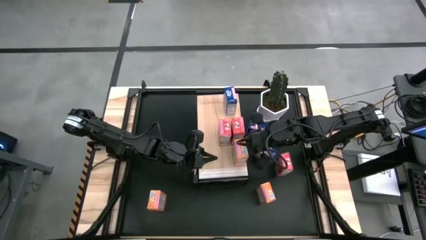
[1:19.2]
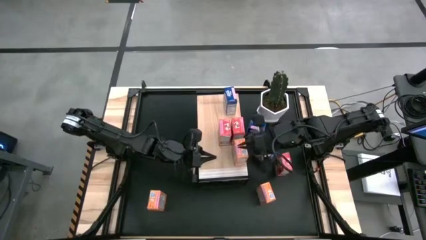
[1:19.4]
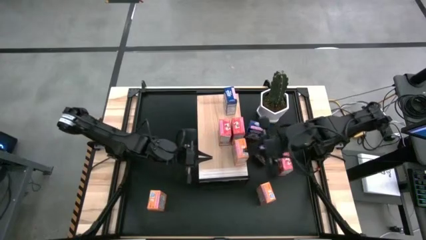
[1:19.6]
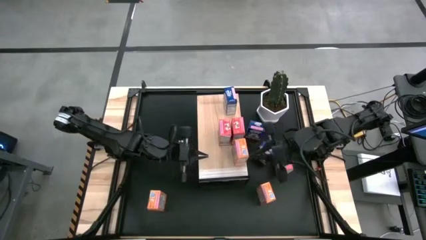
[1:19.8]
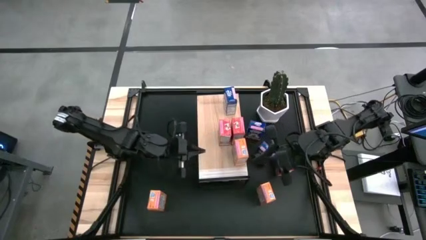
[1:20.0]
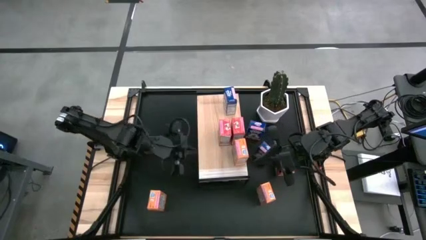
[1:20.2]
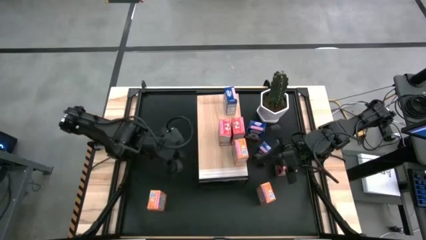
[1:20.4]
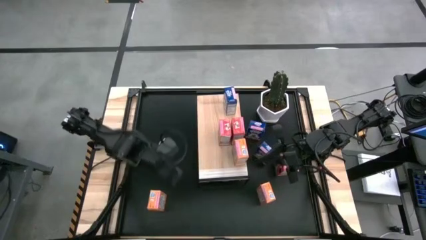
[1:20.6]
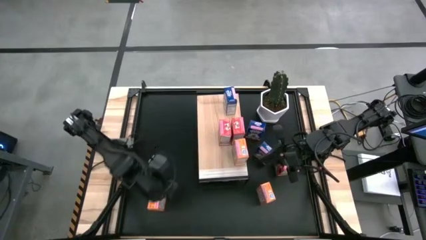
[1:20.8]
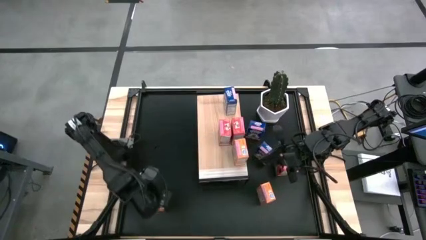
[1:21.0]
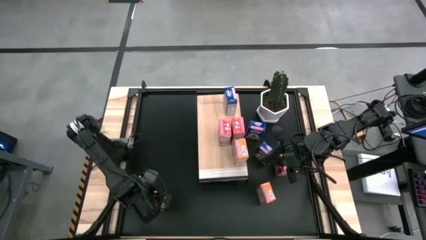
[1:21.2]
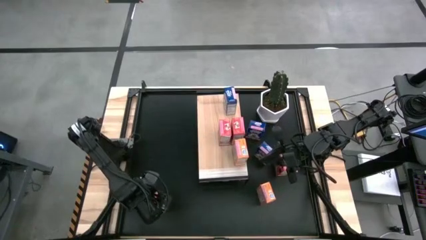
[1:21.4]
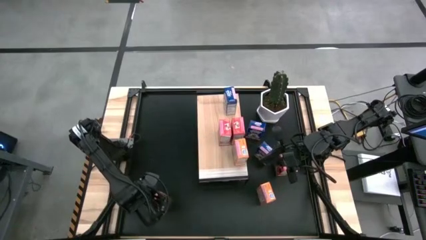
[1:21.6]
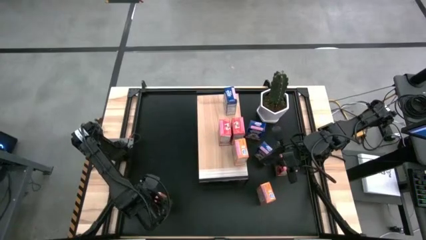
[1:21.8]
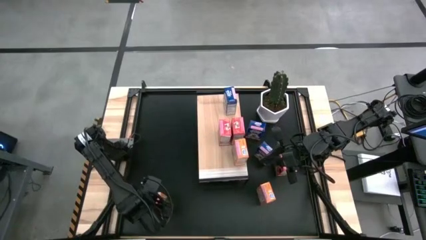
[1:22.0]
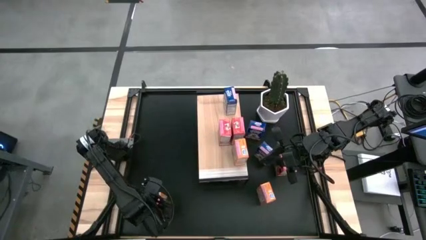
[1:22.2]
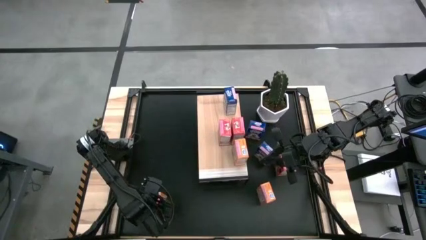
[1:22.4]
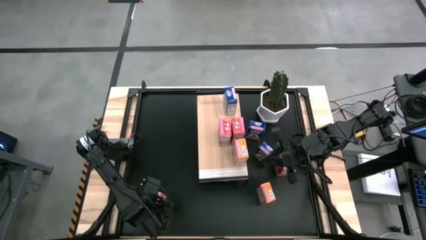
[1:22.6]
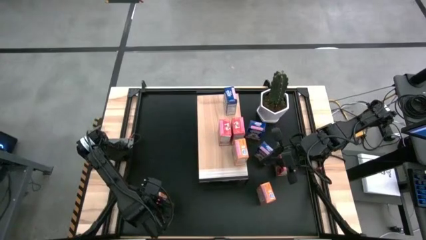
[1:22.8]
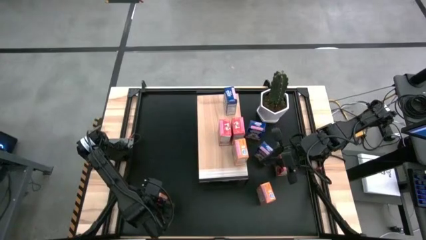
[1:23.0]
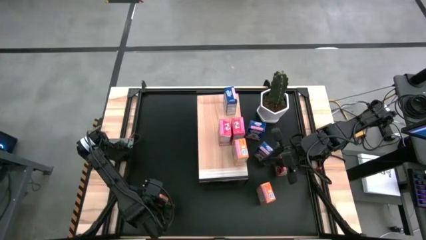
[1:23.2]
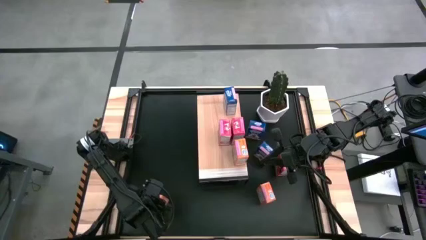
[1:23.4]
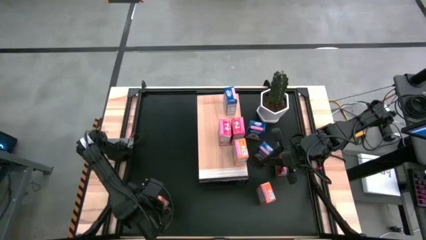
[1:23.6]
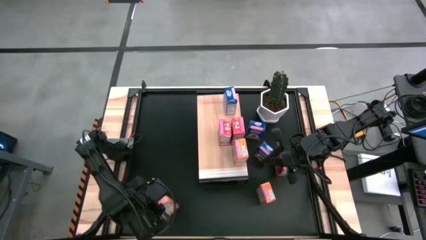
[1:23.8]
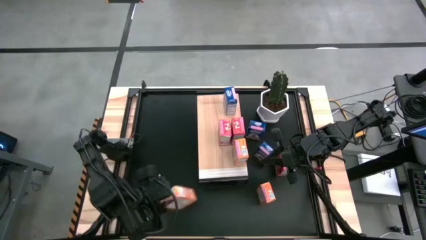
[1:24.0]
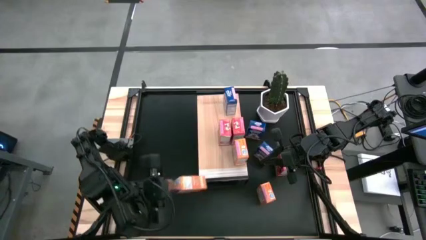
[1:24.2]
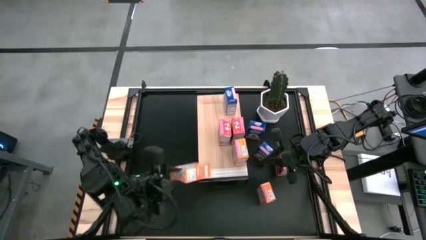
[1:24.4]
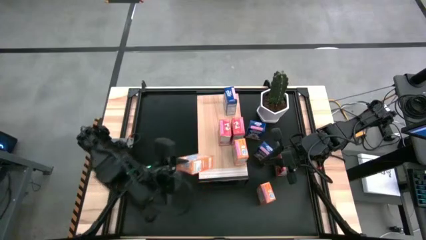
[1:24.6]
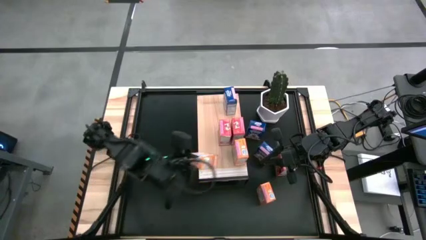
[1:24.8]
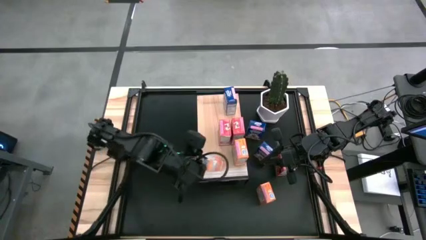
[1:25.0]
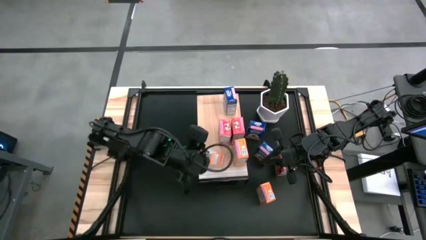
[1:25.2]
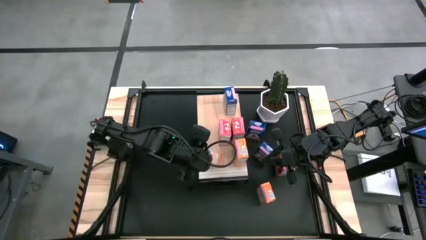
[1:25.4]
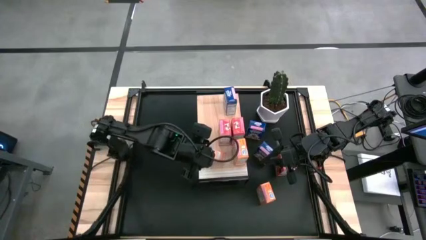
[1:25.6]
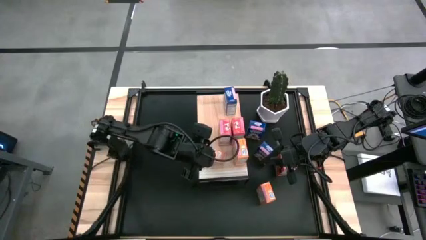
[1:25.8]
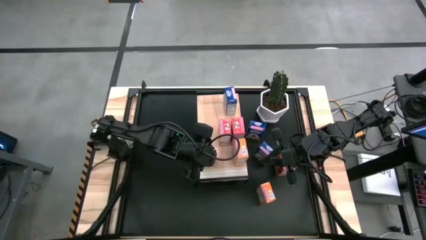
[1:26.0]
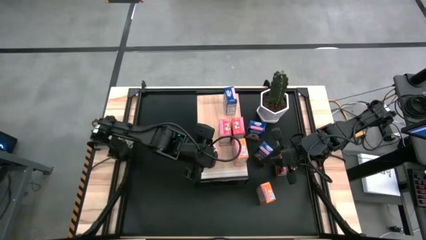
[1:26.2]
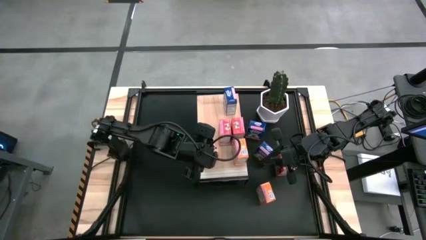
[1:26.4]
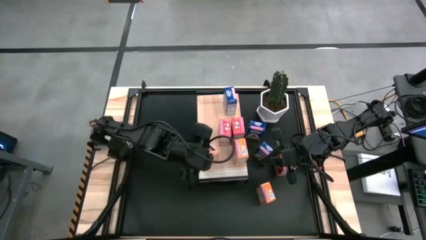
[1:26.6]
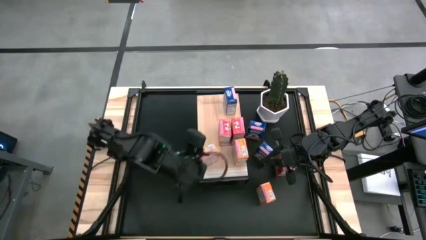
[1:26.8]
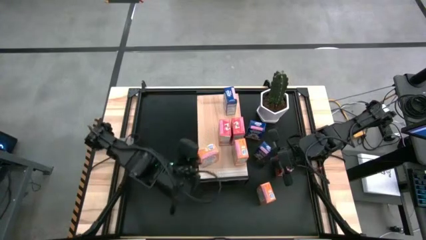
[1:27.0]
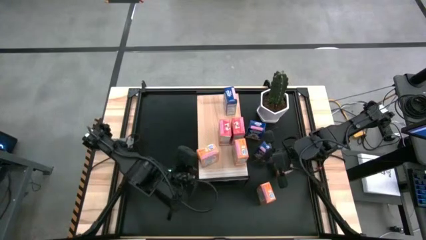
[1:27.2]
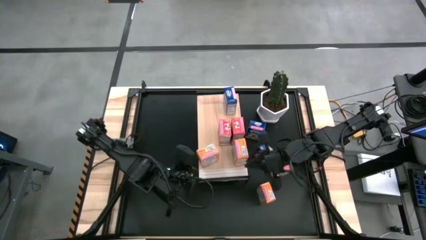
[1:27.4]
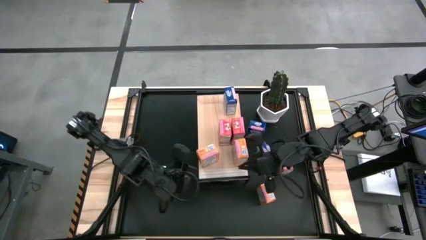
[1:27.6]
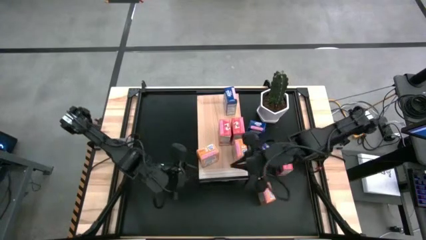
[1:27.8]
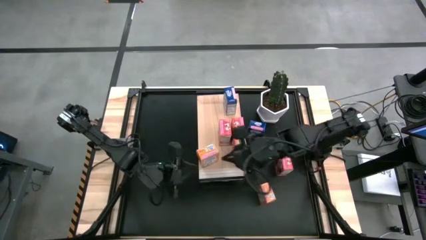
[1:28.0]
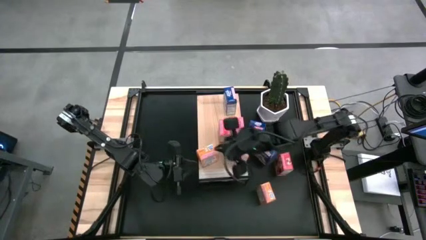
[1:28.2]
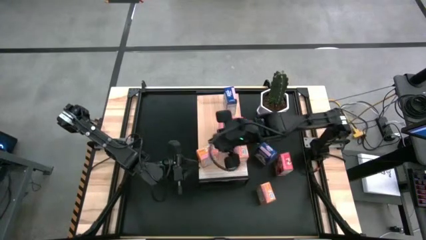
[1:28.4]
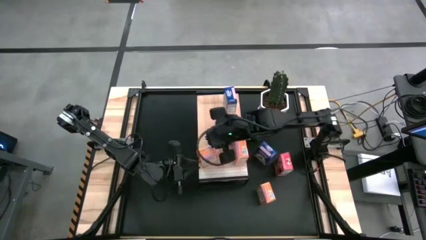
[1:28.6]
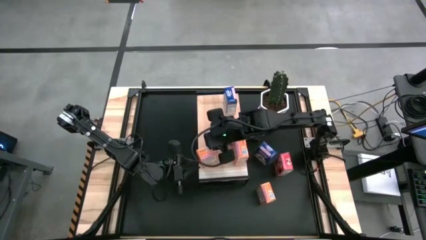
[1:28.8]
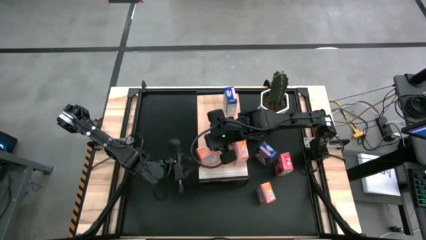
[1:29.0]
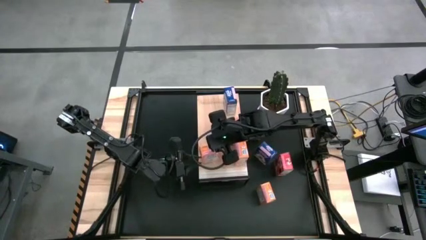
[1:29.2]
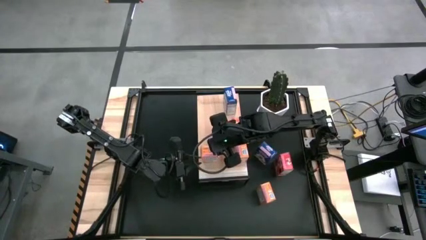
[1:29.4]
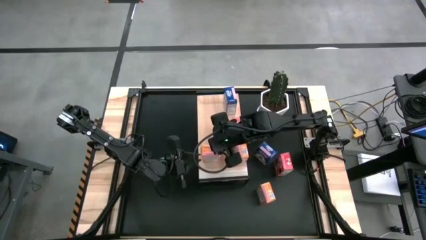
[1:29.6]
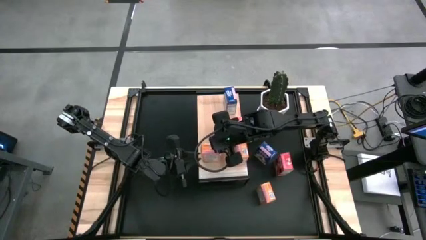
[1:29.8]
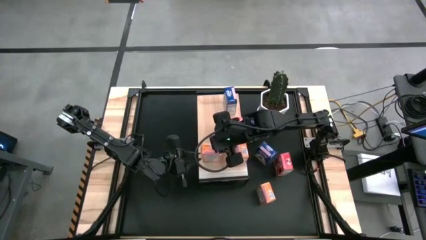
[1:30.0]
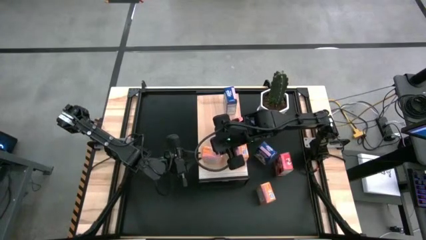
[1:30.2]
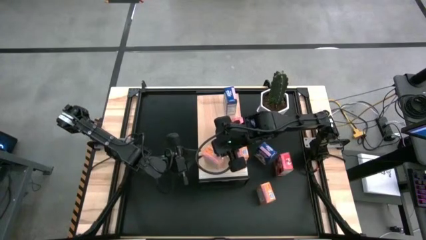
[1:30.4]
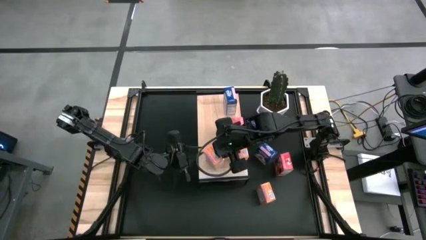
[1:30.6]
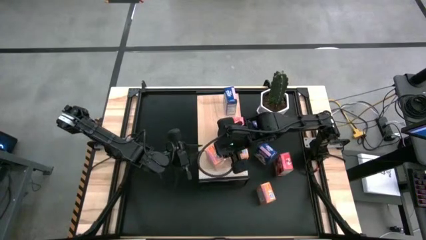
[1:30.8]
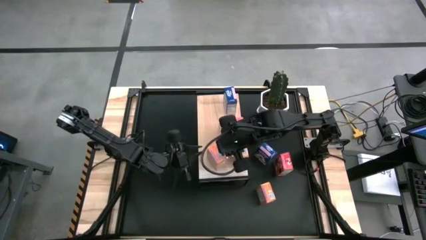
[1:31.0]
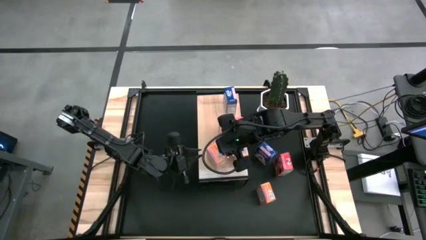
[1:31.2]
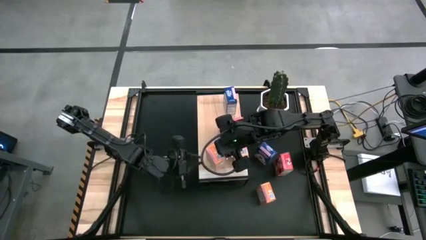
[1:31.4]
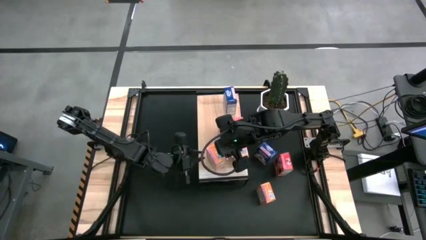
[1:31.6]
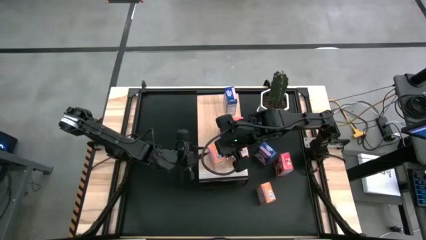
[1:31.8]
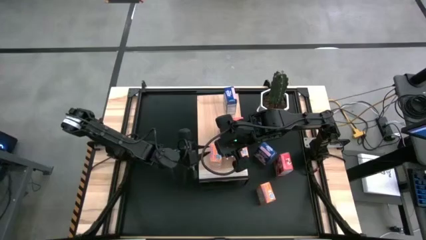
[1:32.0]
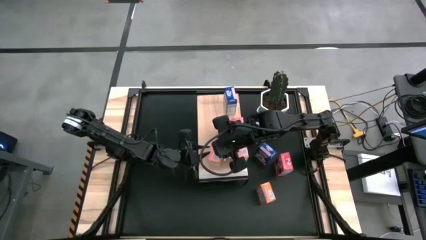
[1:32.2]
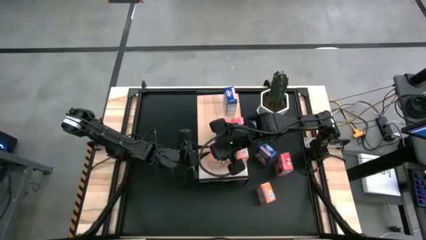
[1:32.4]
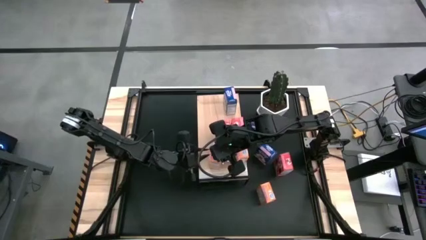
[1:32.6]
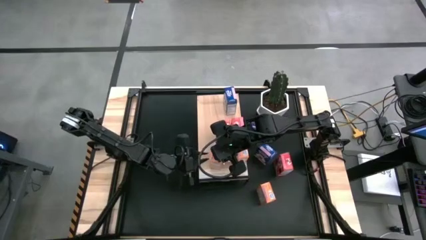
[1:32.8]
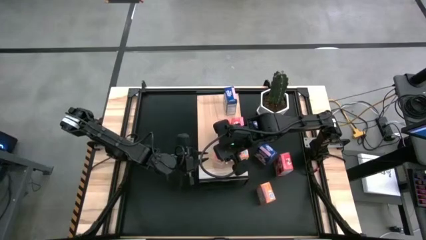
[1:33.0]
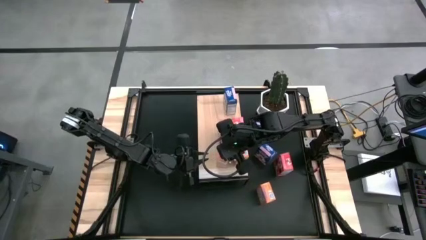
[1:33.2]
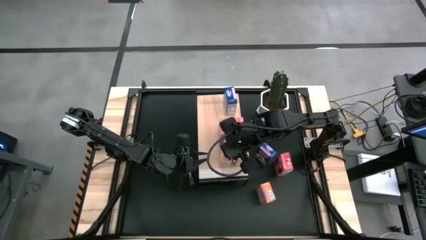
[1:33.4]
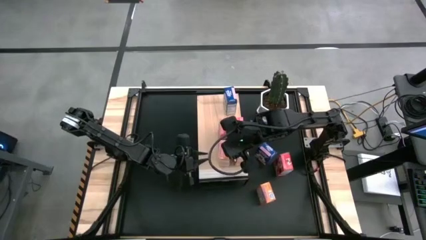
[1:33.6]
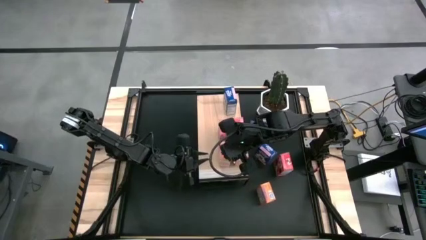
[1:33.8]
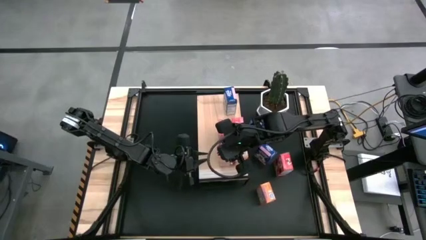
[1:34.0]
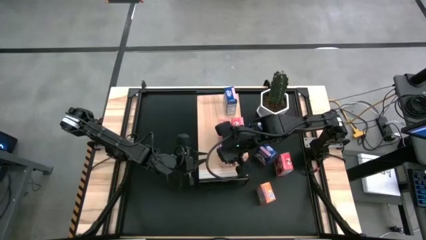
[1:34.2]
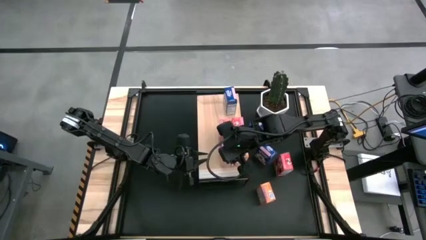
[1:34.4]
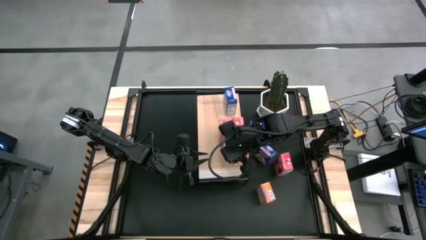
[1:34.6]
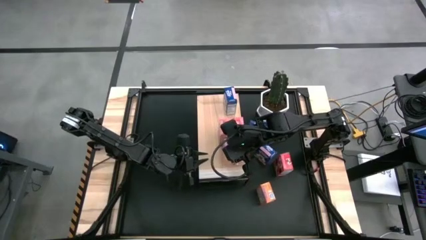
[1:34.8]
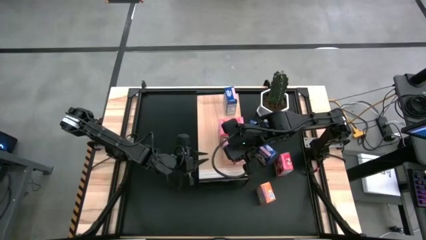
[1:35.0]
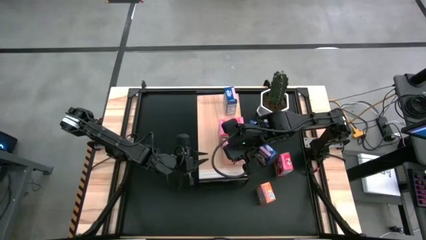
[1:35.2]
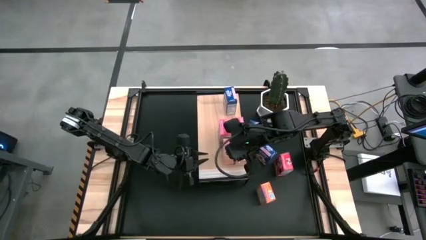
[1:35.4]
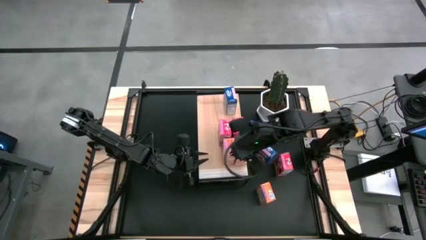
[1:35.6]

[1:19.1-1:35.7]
Task: Stack cereal on shelf
Put the left orange cereal box aligned with the other orange cereal box on the shelf
